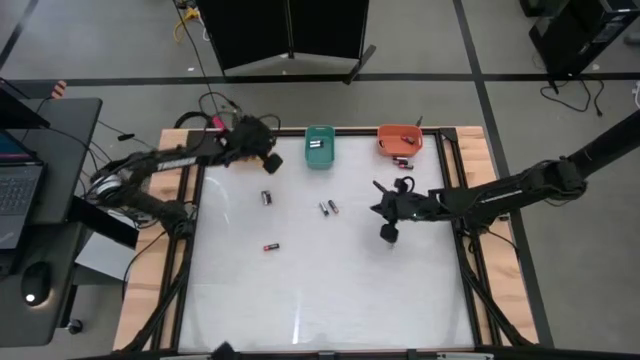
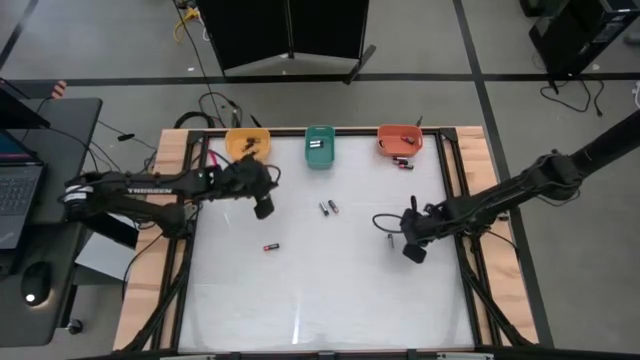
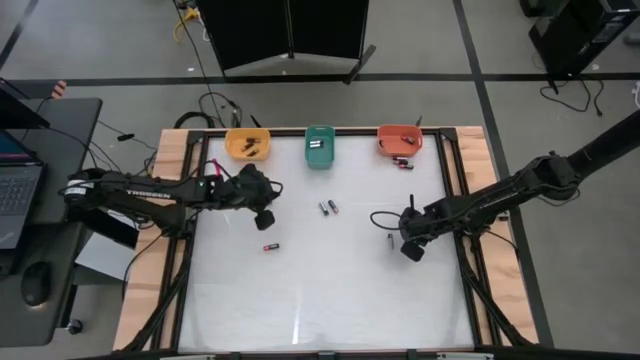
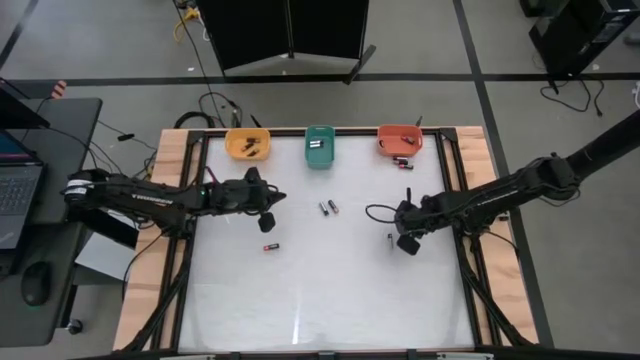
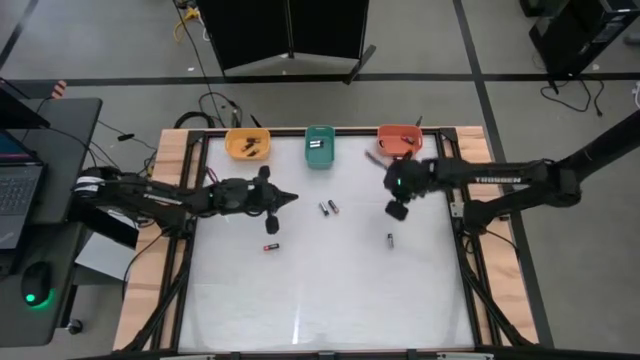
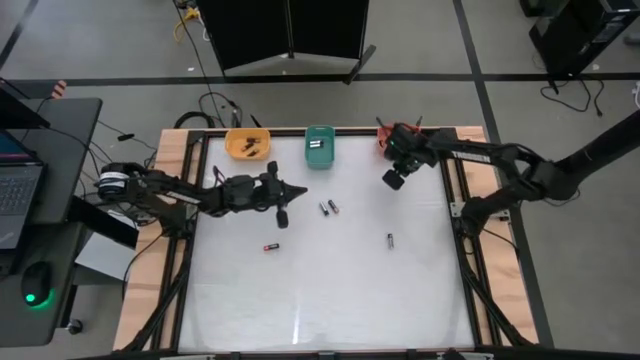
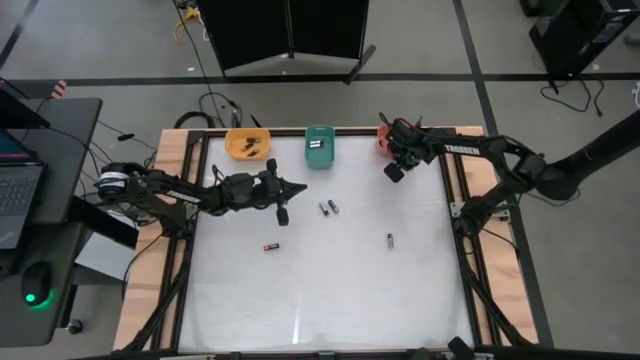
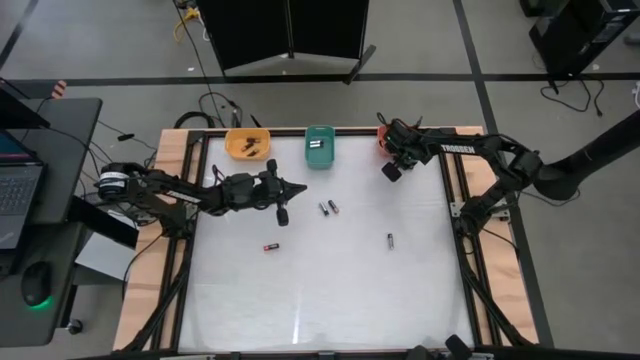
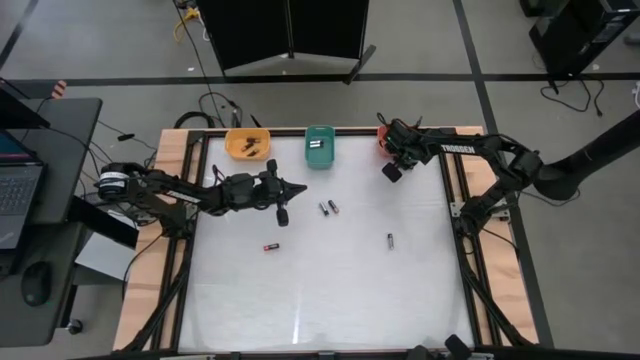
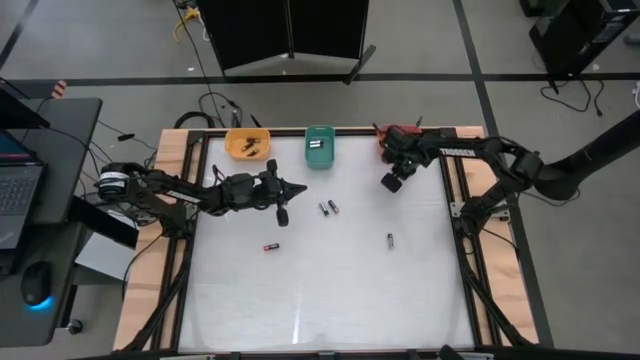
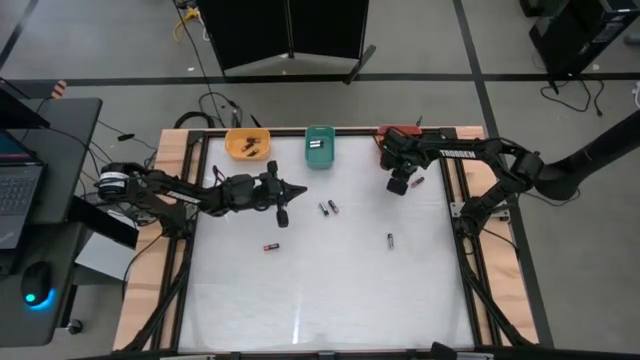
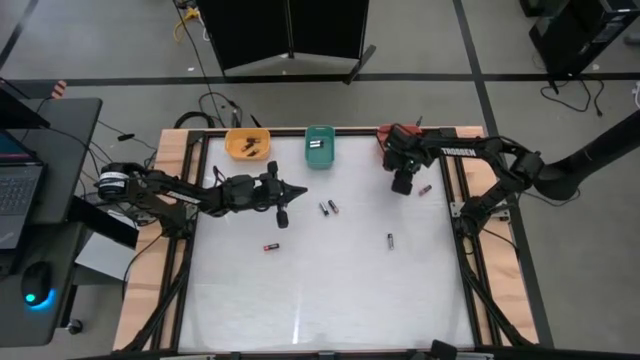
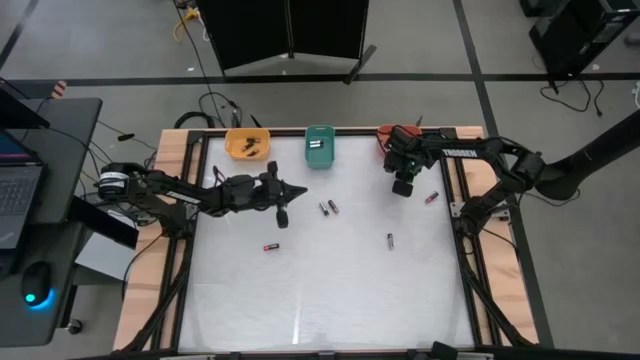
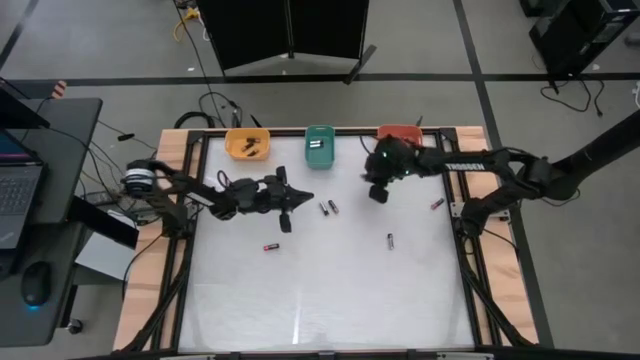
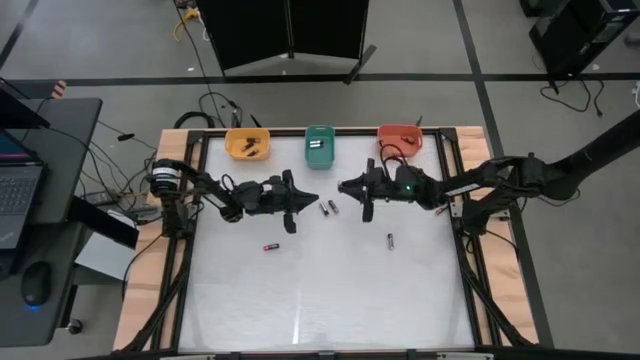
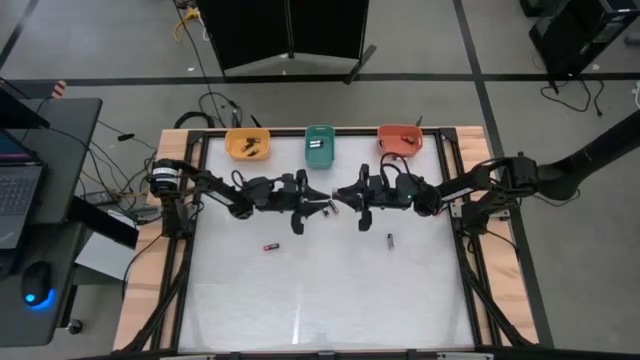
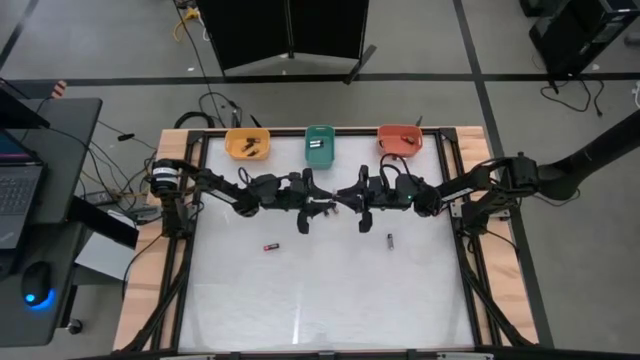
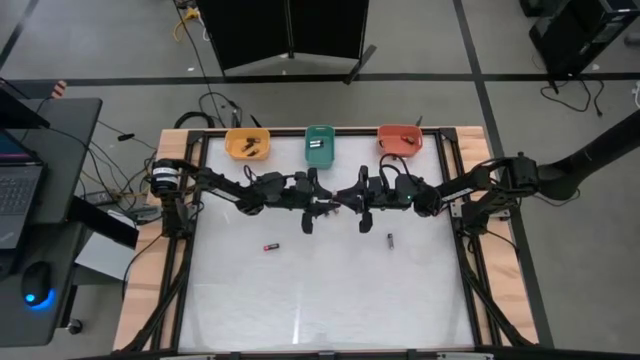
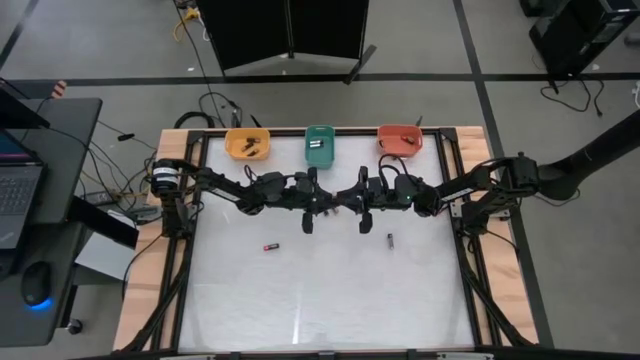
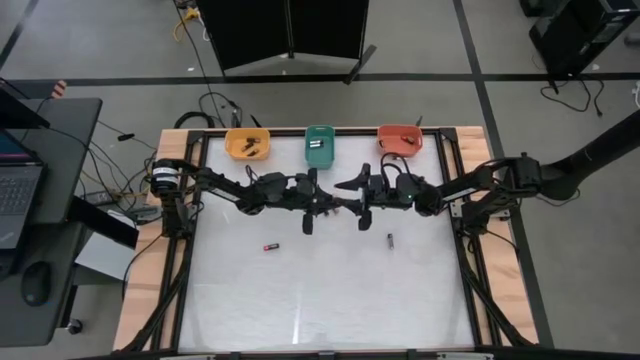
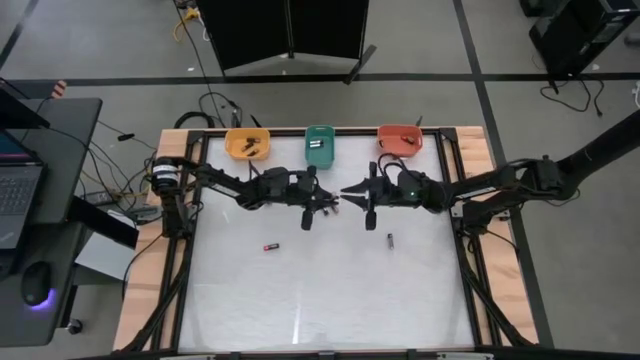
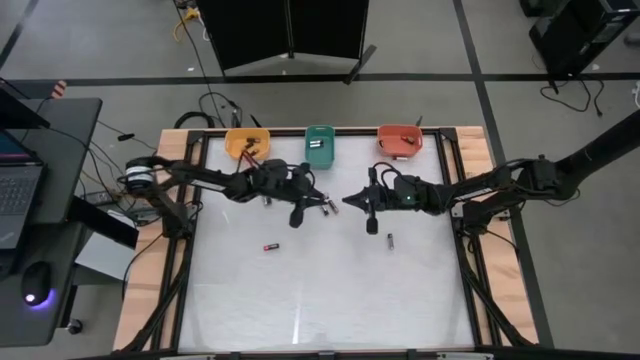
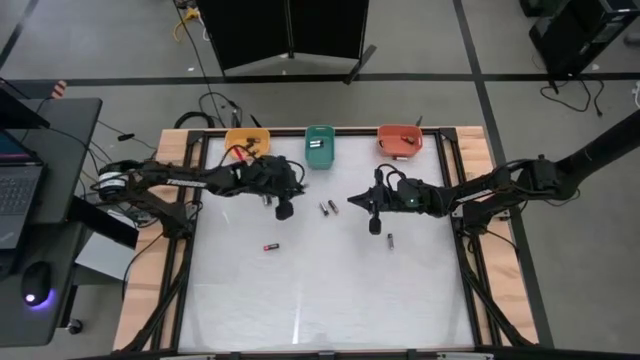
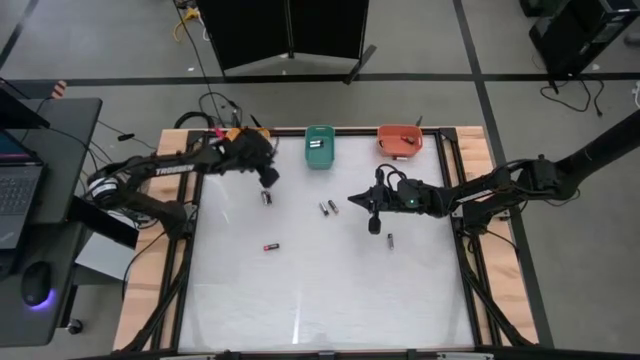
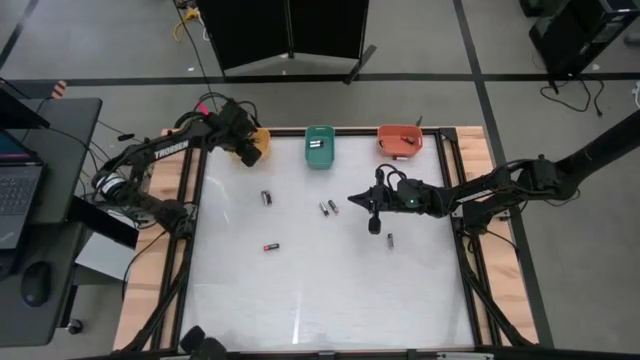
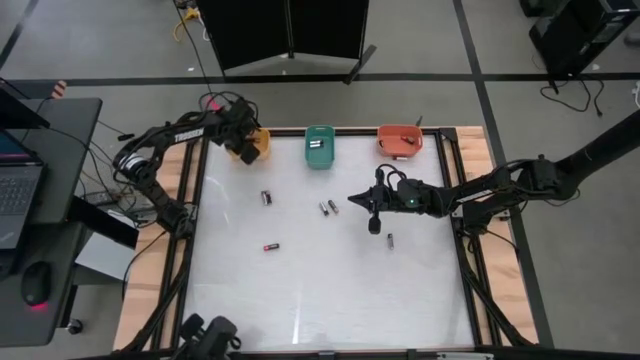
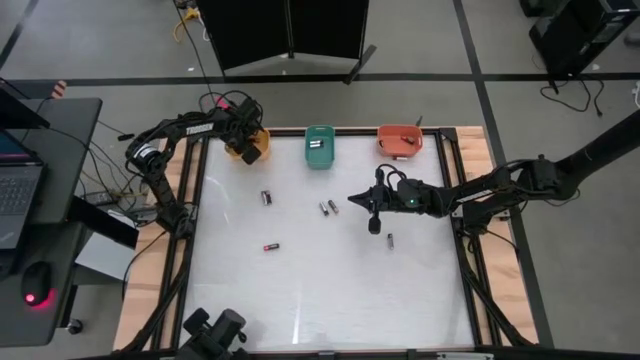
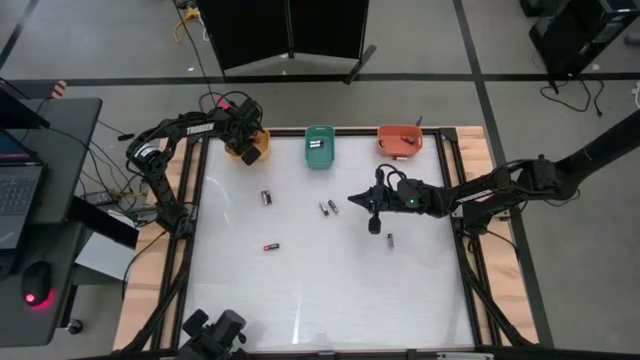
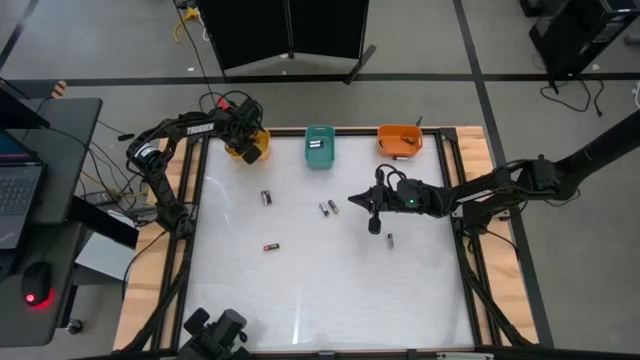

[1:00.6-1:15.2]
Task: Sort batteries
Put the black battery into the yellow bin

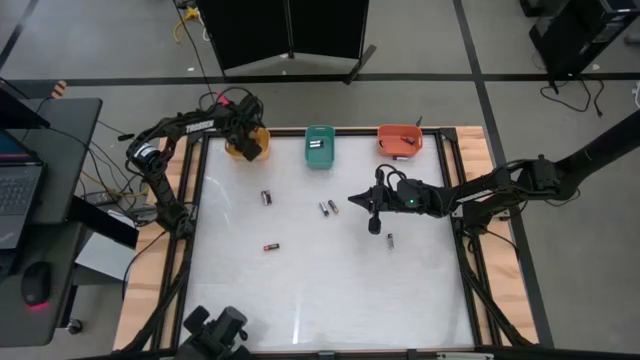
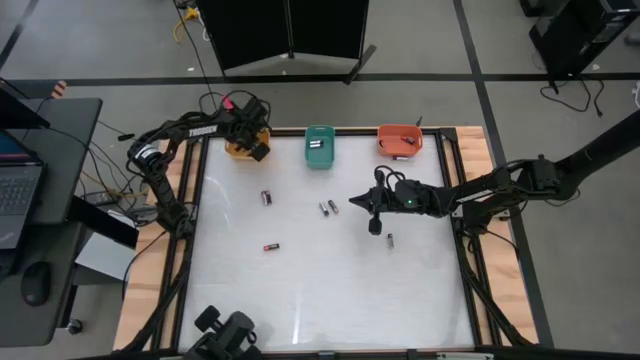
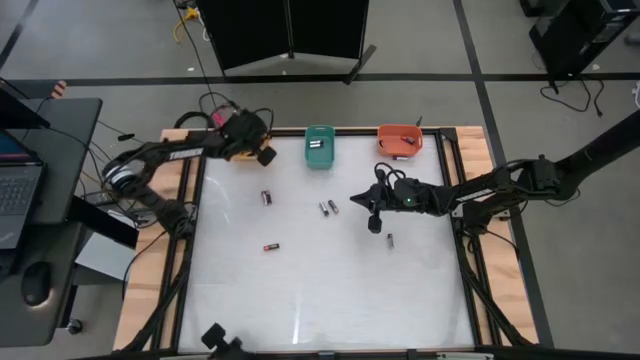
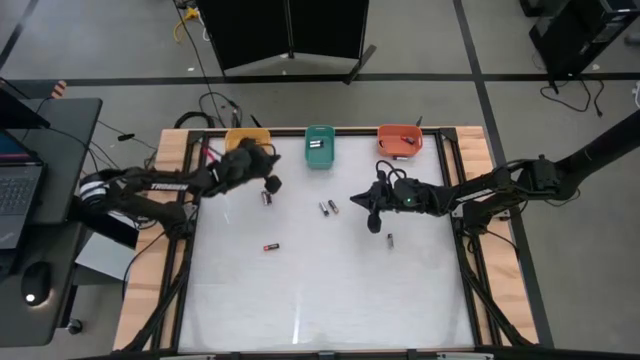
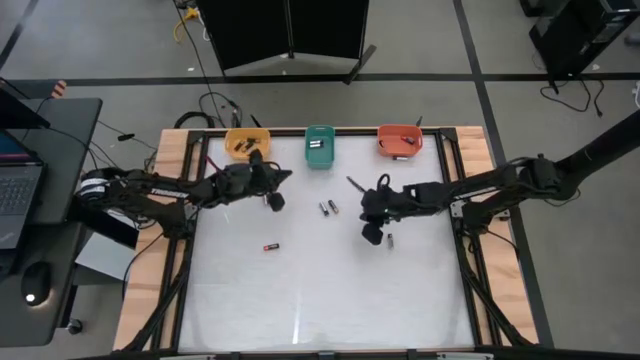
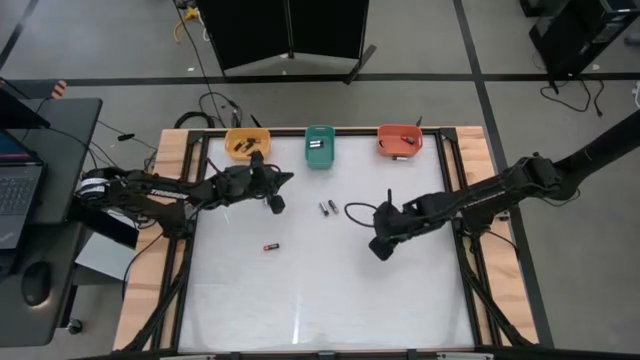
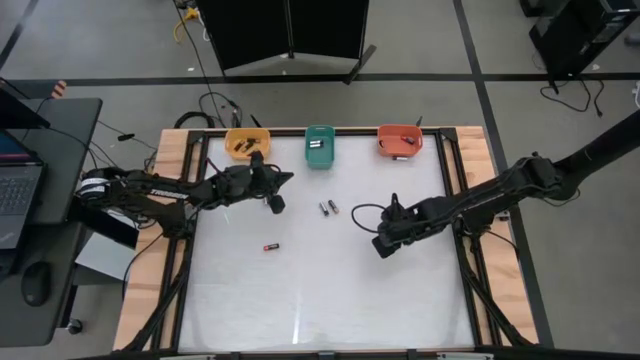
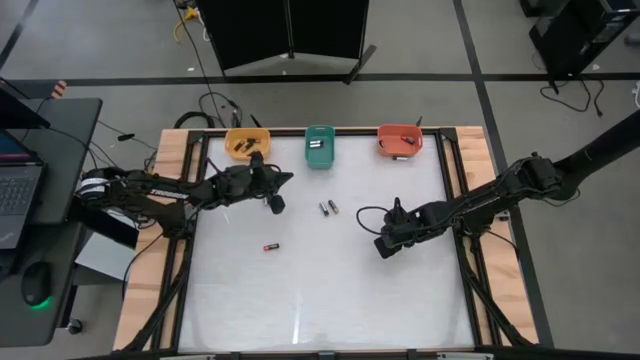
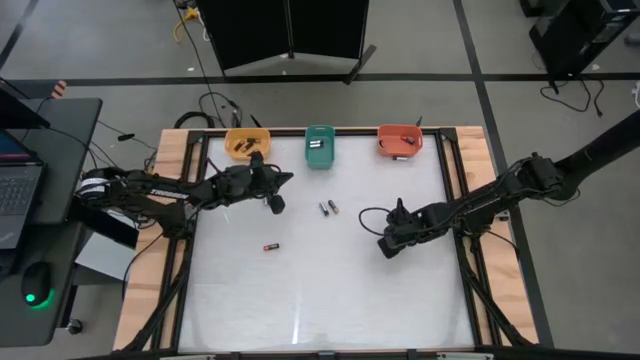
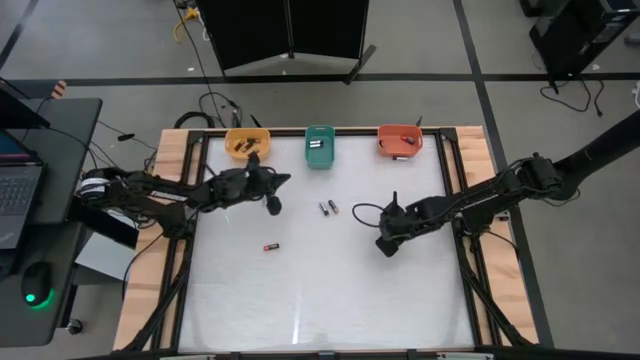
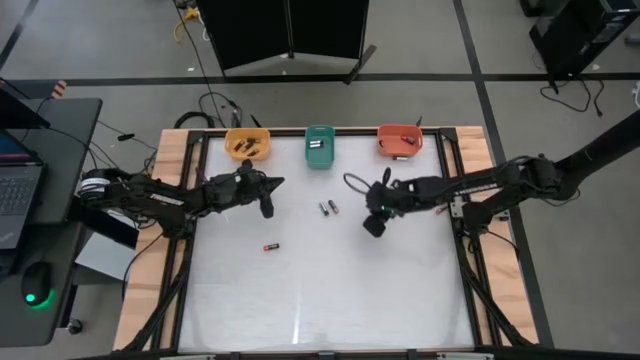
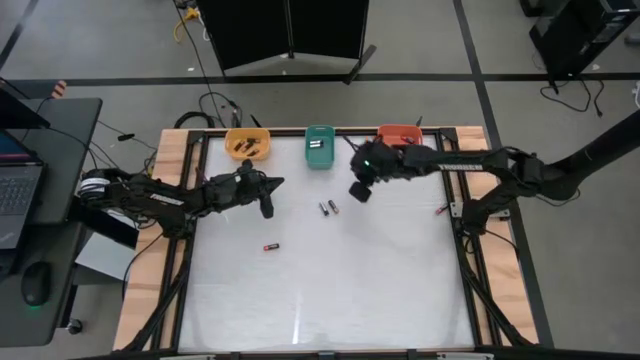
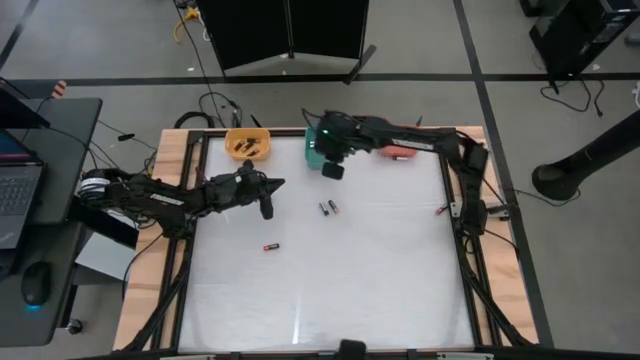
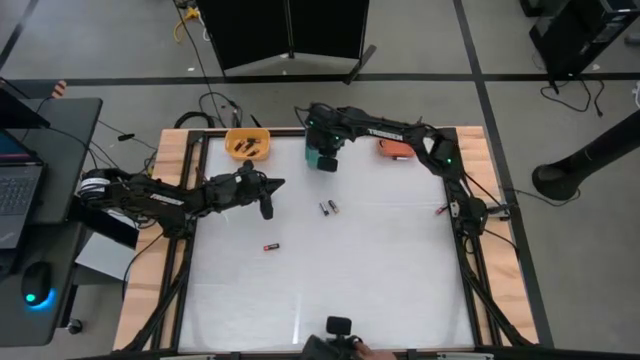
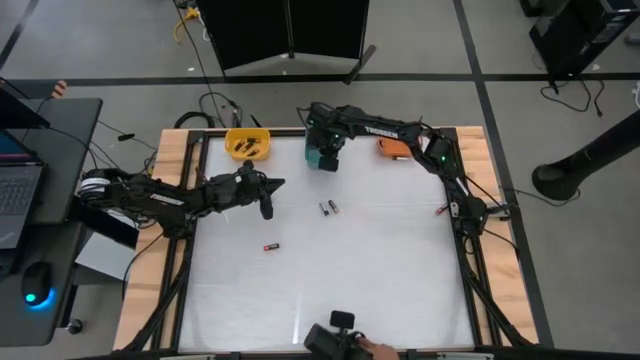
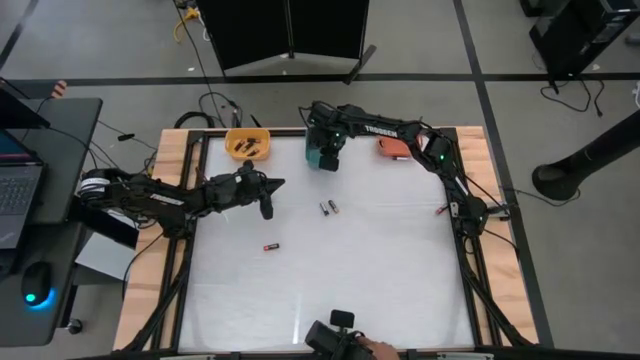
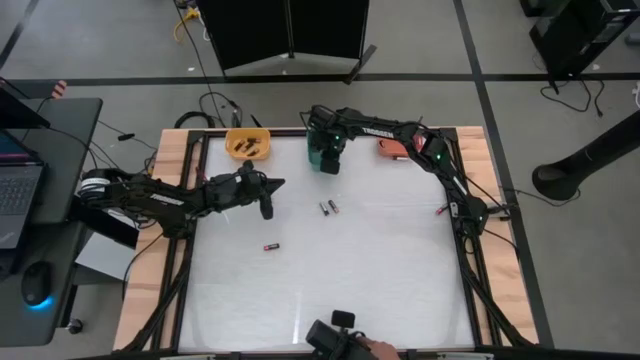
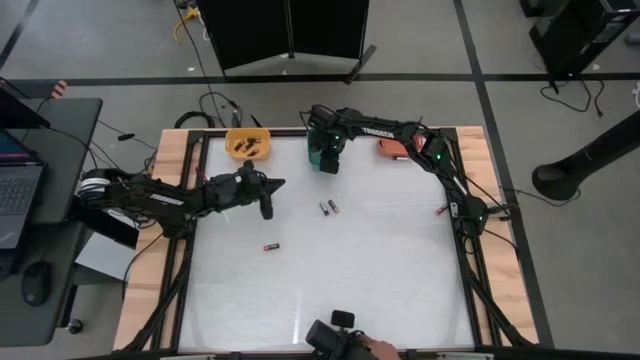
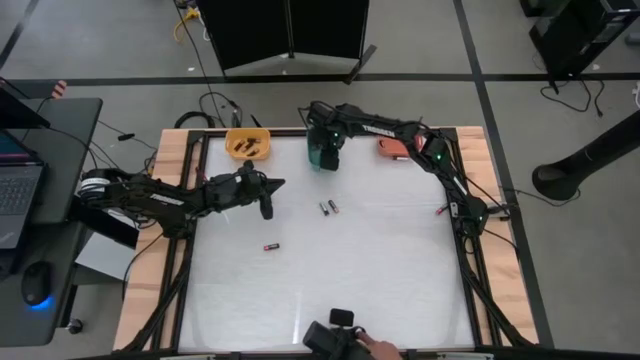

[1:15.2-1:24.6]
Put the silver battery into the green bin
